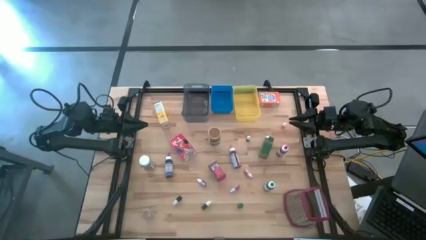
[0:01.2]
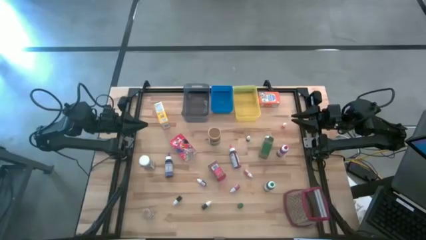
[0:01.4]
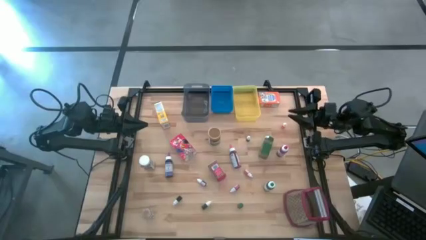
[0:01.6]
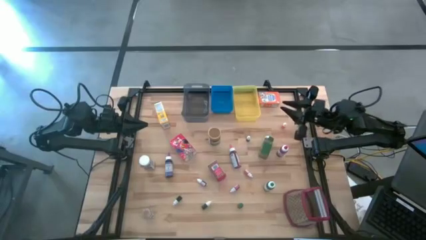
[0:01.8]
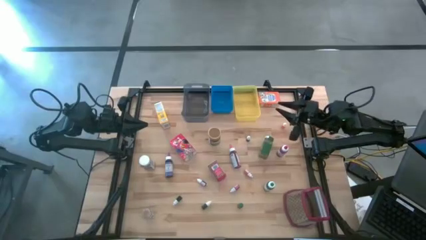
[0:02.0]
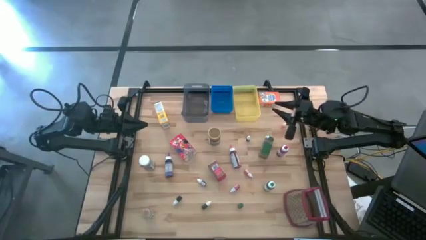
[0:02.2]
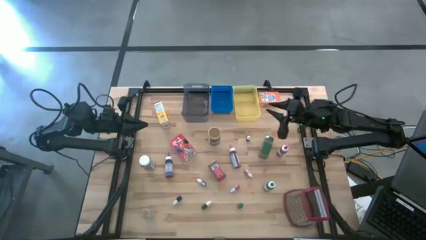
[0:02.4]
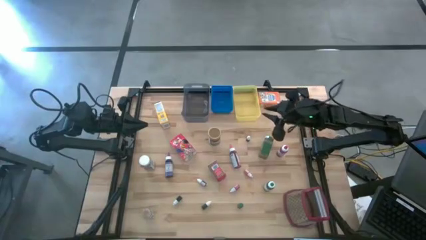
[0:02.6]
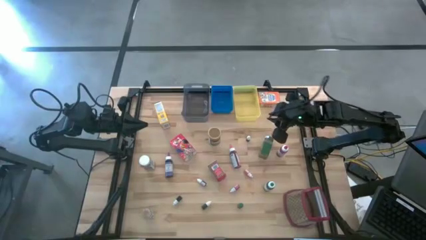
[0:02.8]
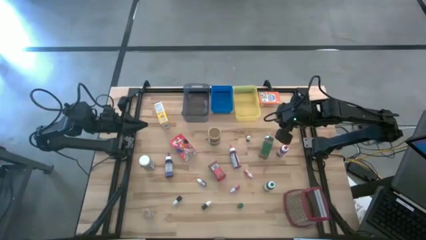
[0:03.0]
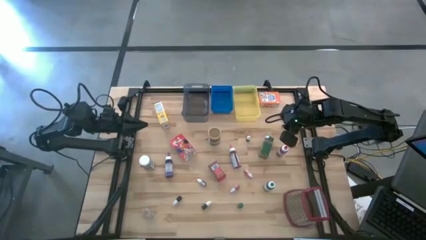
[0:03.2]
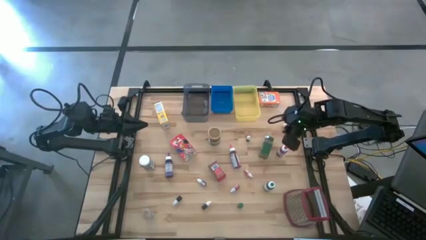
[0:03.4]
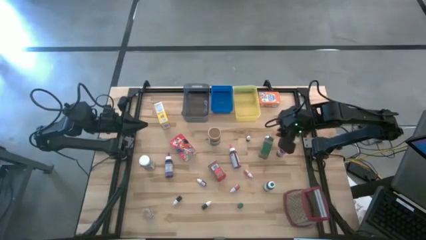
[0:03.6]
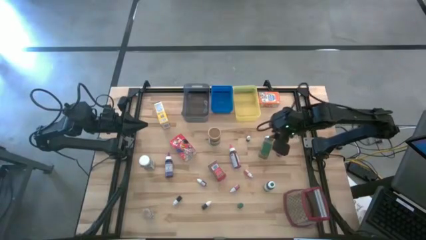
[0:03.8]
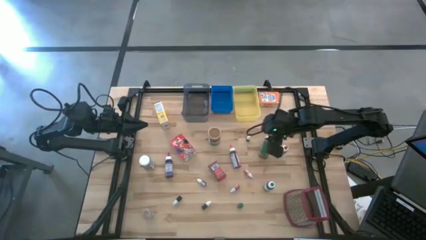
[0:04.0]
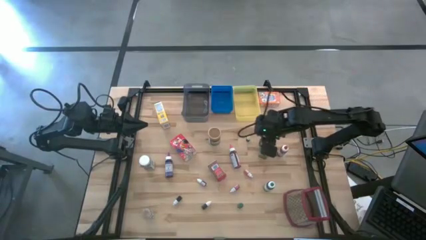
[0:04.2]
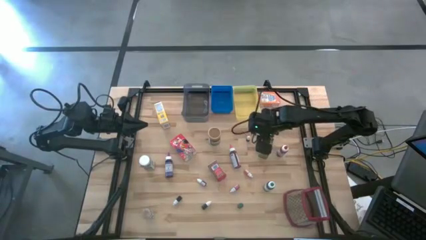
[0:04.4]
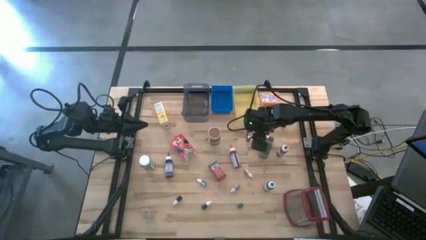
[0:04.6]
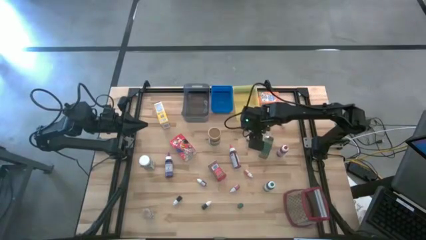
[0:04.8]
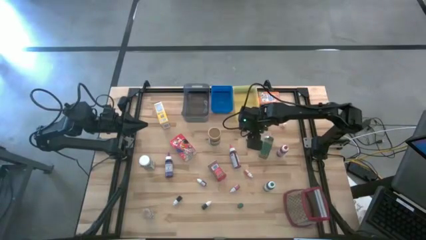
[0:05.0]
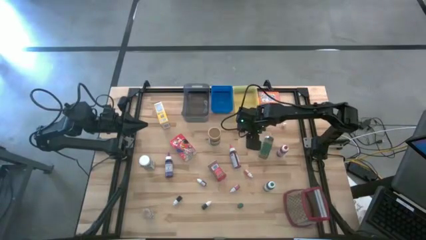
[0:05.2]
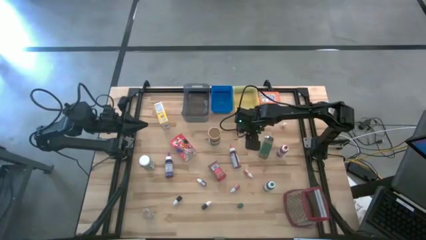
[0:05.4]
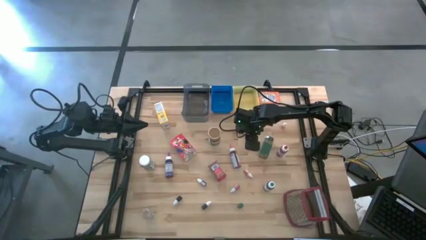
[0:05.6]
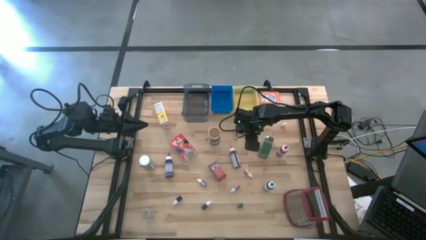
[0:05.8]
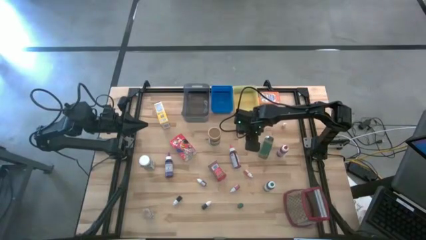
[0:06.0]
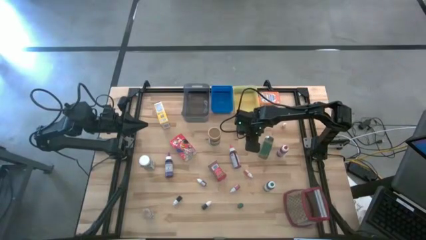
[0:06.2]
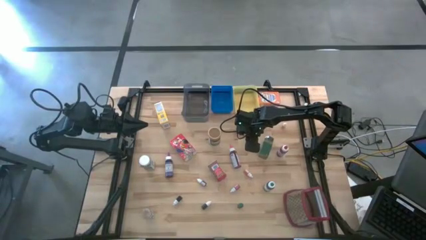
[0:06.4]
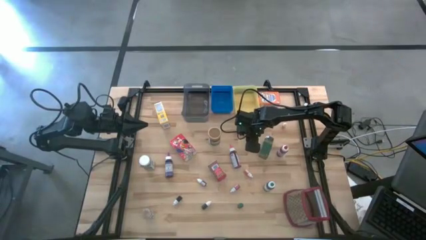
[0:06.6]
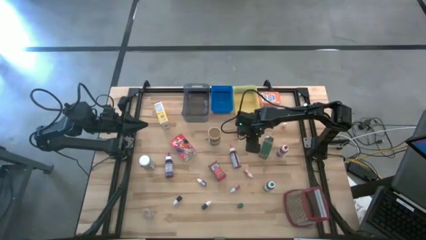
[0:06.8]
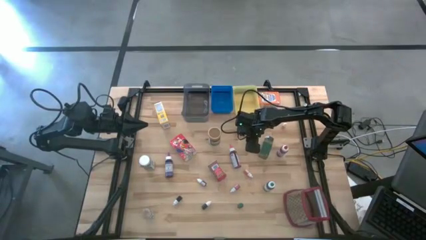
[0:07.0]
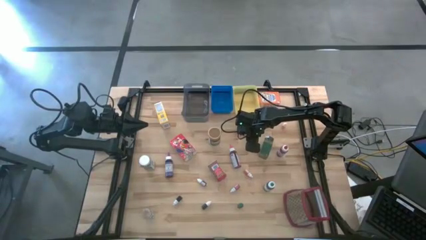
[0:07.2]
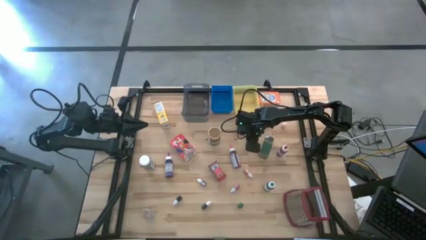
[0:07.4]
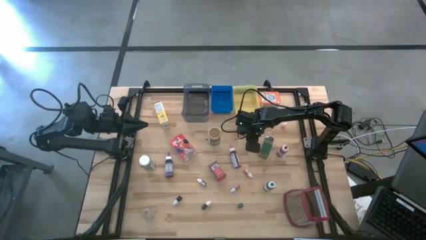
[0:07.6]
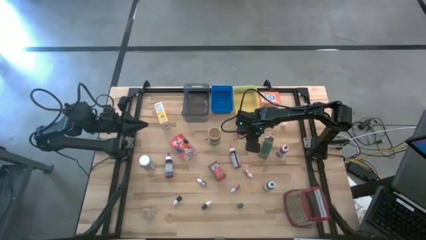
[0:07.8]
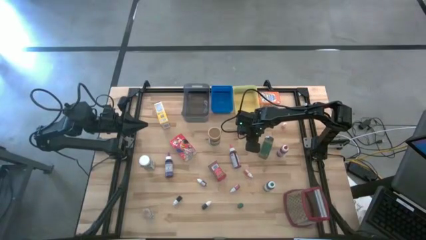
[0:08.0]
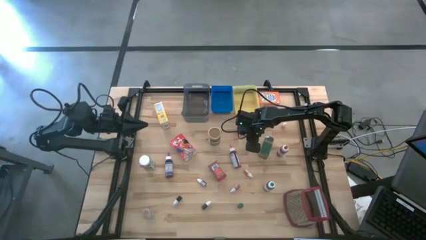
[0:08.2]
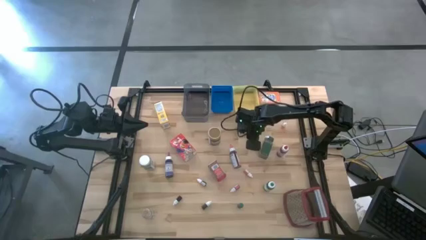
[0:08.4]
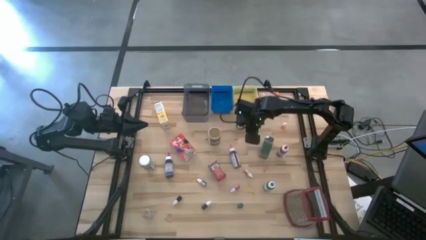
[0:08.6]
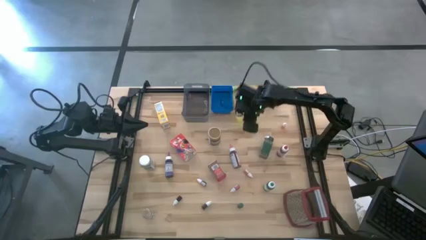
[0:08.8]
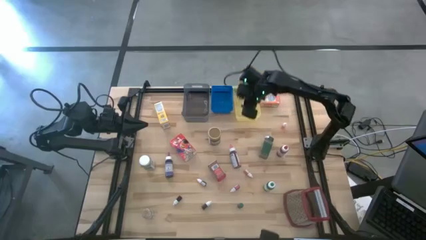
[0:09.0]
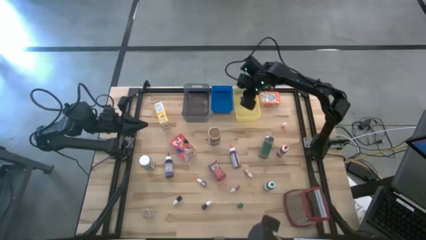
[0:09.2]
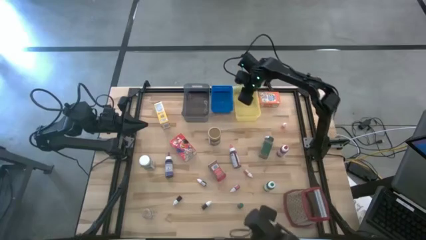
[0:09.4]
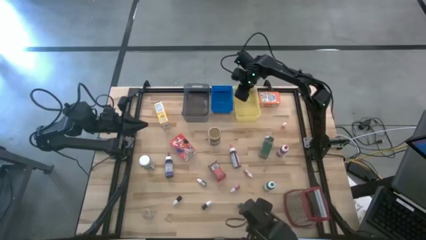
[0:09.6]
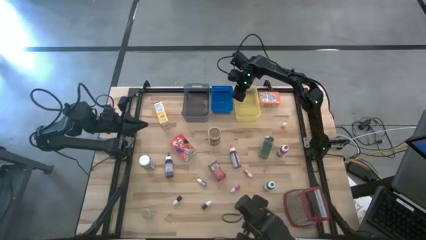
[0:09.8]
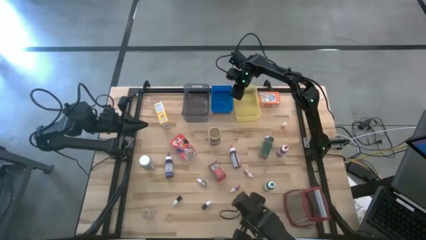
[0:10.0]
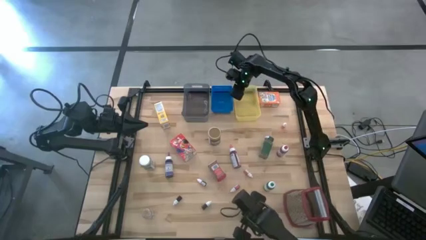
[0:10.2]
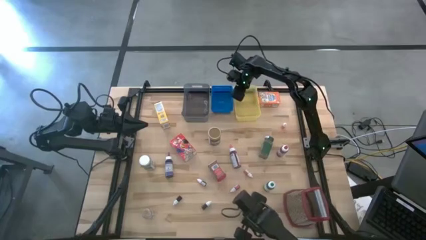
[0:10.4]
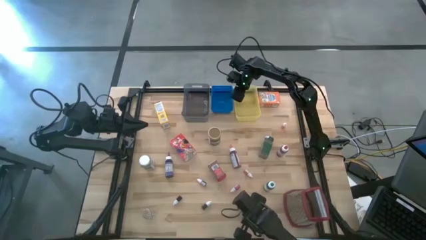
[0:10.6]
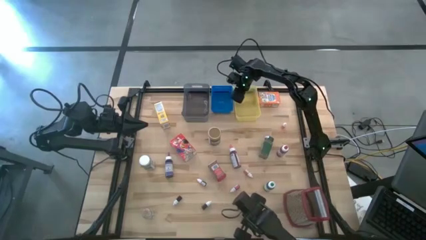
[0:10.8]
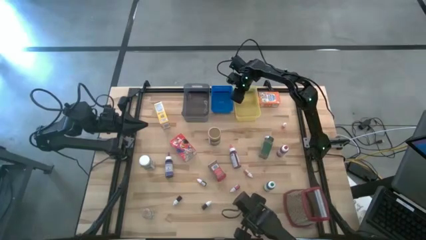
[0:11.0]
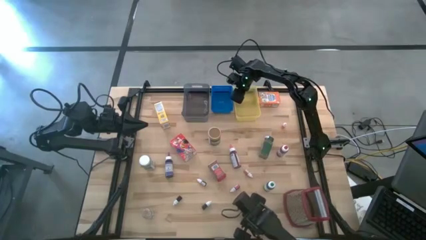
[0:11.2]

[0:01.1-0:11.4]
Task: Pick & Place Kitchen Items
Put the violet food coloring bottle into the yellow bin

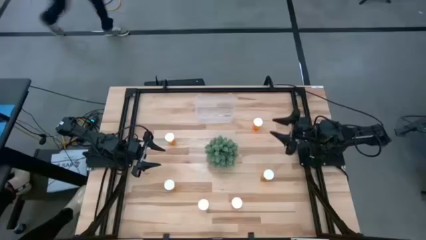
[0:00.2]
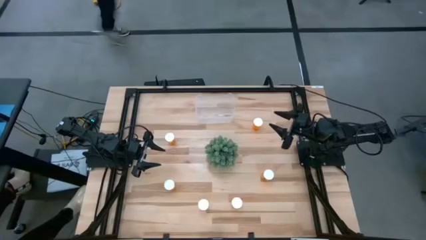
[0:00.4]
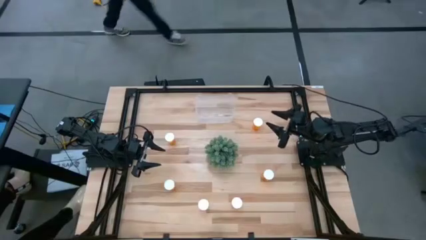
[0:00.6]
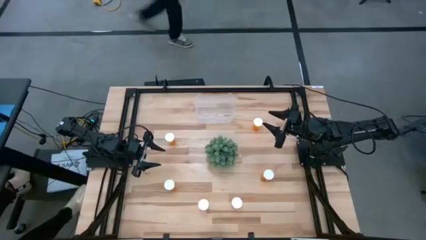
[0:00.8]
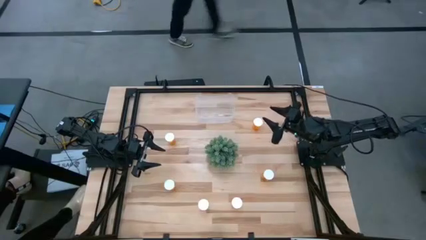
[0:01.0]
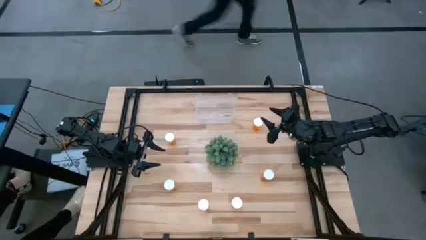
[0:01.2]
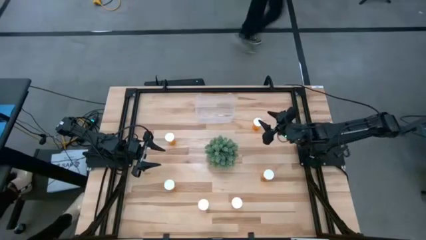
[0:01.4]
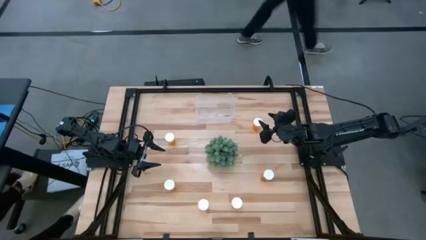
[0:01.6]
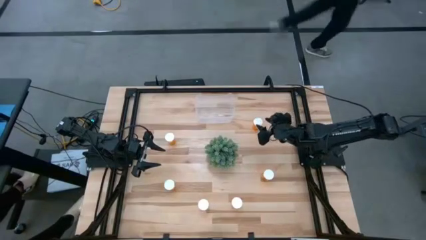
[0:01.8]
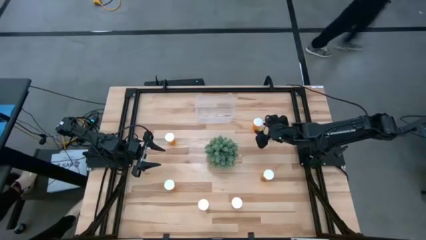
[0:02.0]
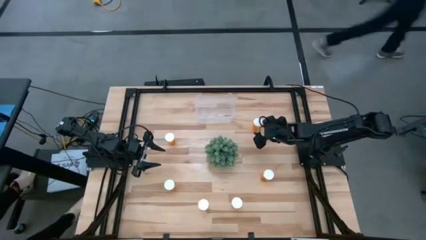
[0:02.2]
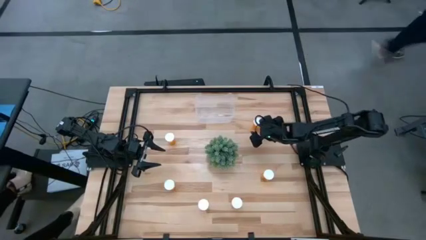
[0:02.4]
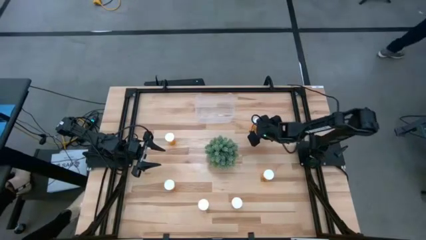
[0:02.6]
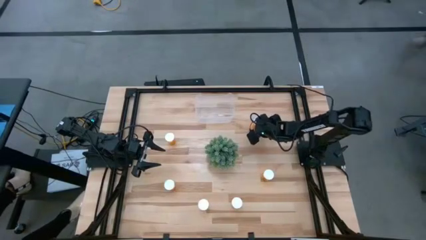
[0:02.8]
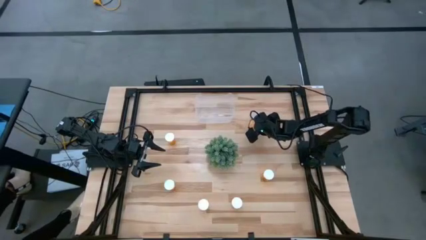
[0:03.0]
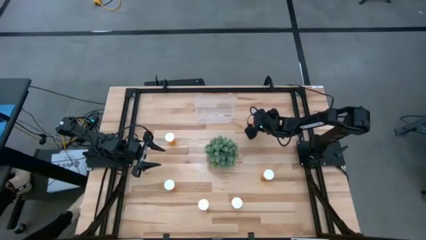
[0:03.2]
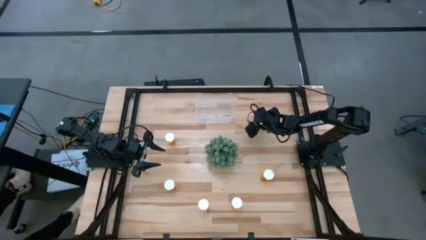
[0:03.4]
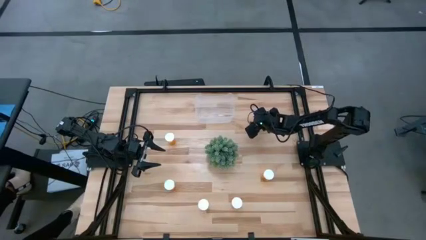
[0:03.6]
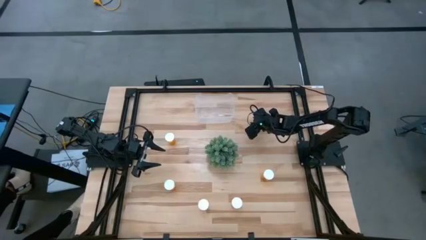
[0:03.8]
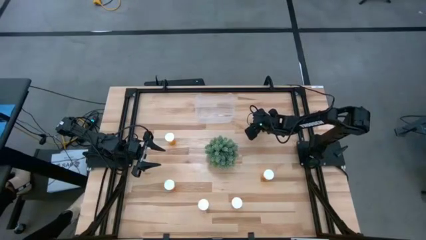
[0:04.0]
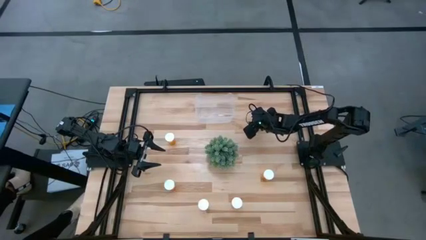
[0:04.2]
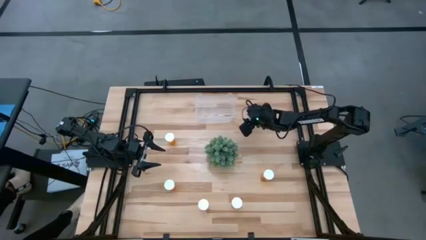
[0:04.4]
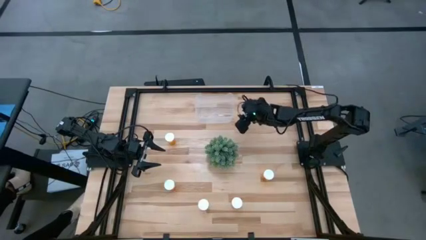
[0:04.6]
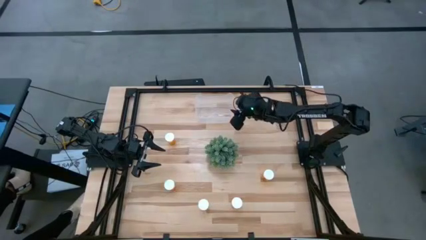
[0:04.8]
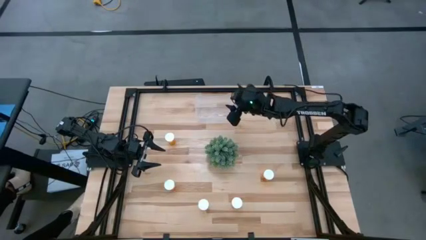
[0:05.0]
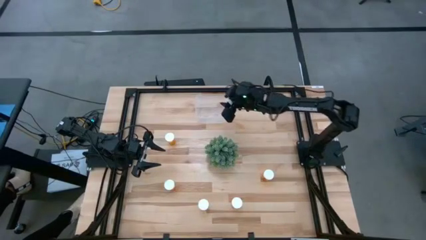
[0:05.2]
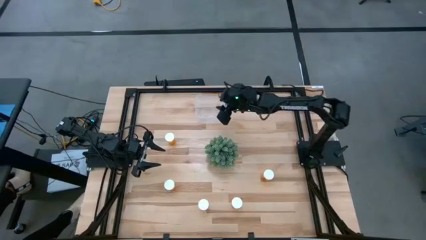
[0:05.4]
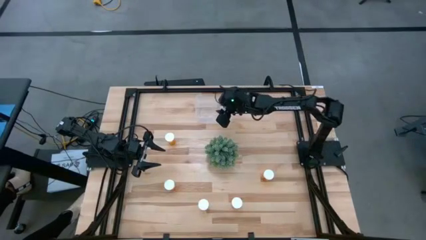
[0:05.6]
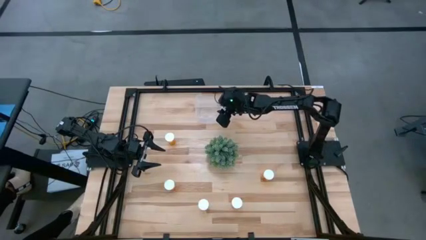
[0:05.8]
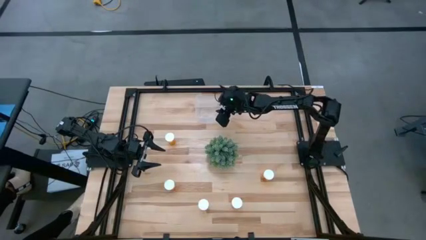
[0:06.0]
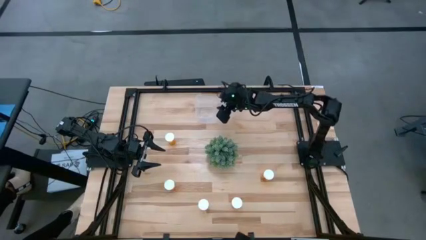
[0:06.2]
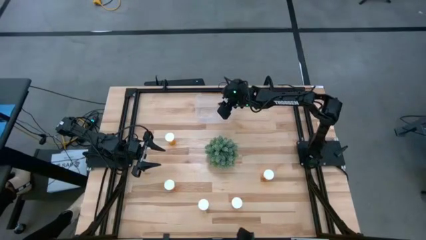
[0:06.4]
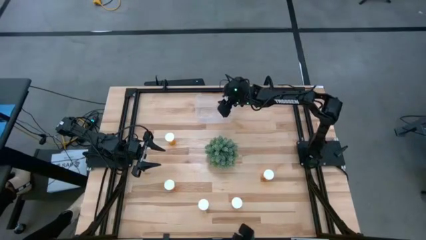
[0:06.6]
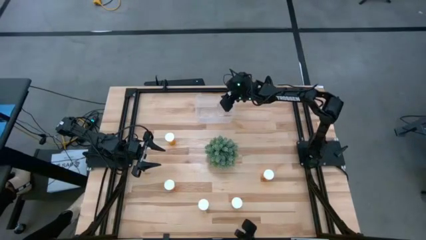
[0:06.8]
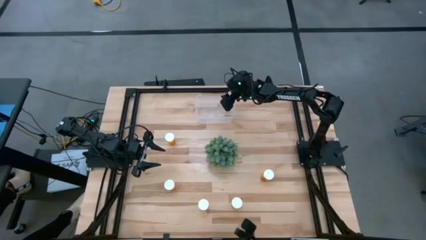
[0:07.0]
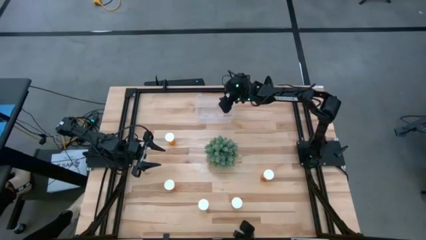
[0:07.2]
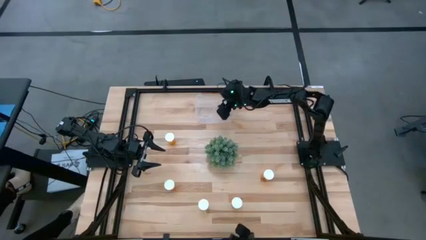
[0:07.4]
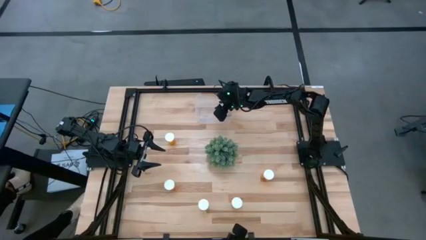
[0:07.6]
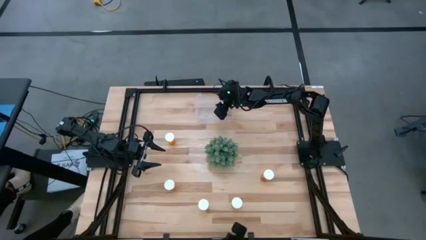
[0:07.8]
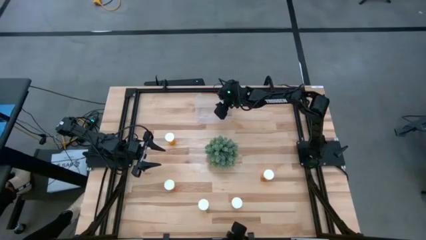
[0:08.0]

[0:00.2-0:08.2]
Task: Pick and place pill bottles into a basket
Put the orange pill bottle into the transparent bin
